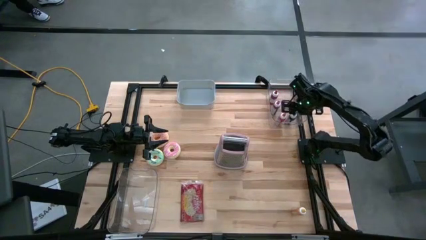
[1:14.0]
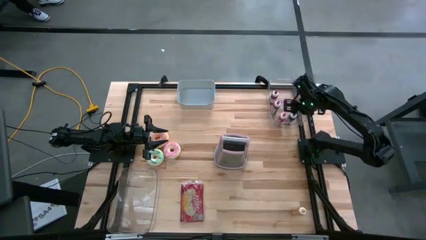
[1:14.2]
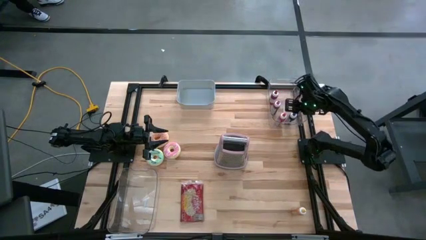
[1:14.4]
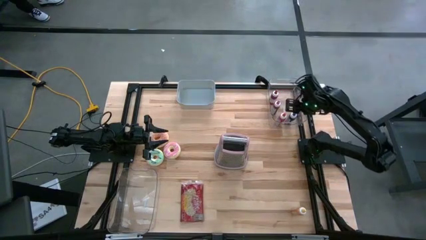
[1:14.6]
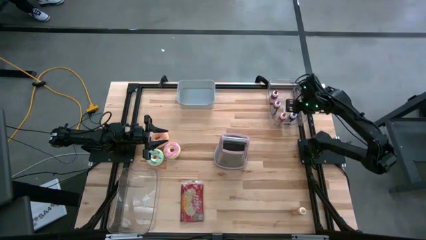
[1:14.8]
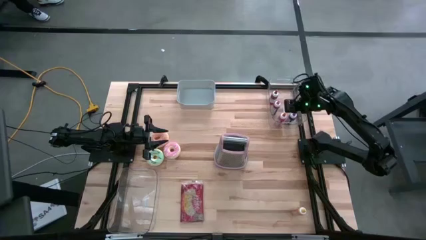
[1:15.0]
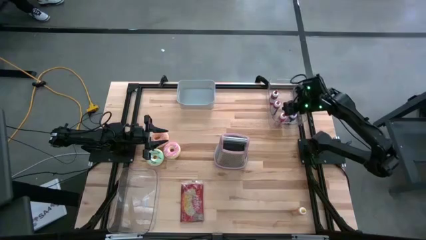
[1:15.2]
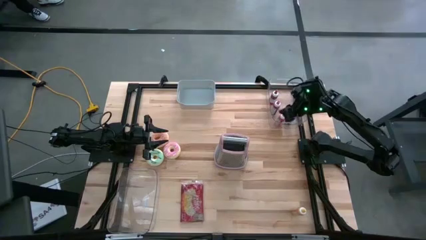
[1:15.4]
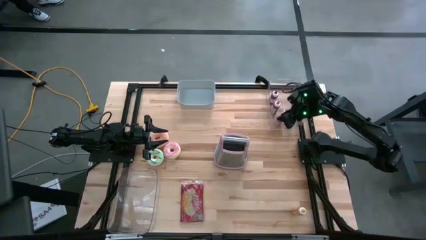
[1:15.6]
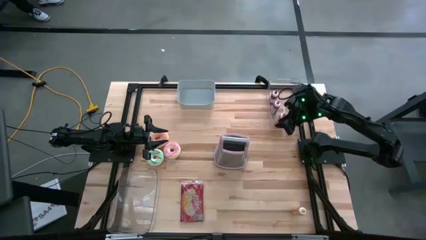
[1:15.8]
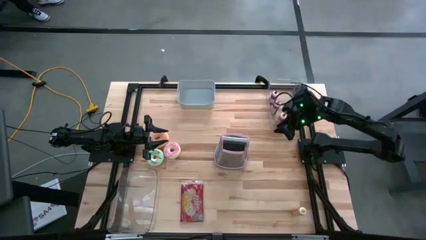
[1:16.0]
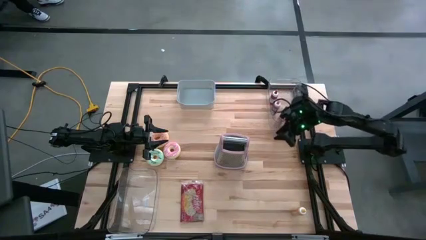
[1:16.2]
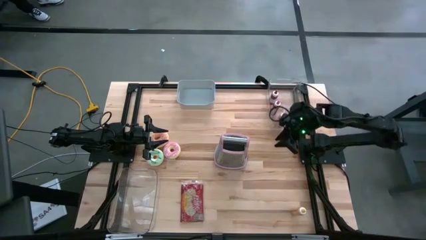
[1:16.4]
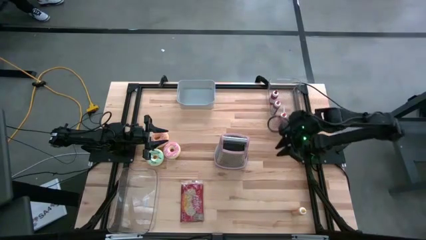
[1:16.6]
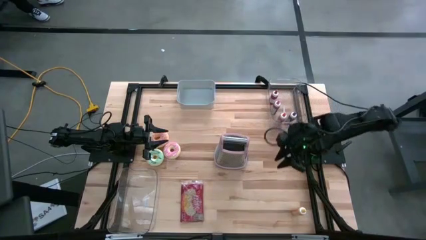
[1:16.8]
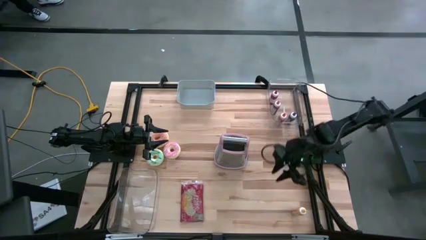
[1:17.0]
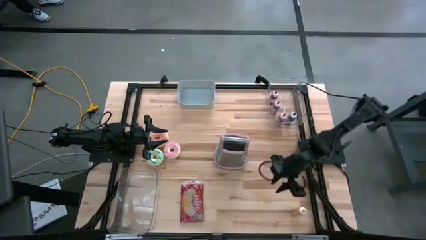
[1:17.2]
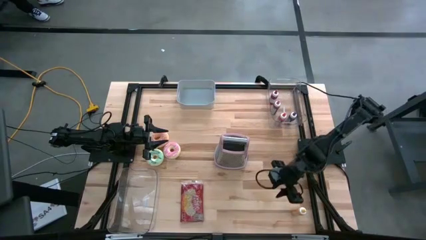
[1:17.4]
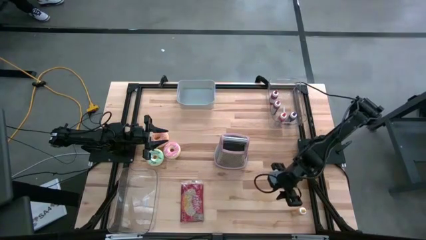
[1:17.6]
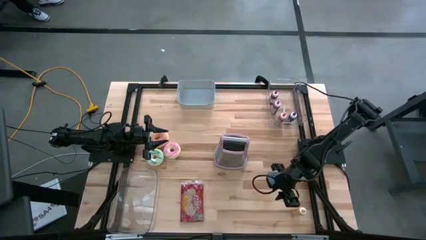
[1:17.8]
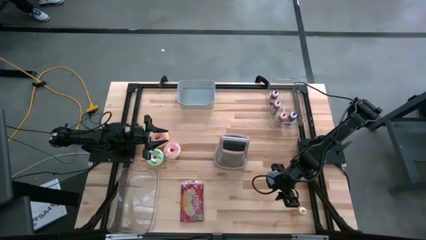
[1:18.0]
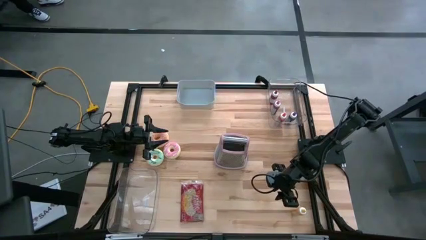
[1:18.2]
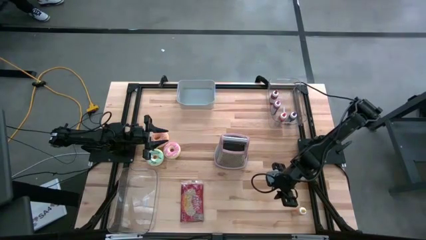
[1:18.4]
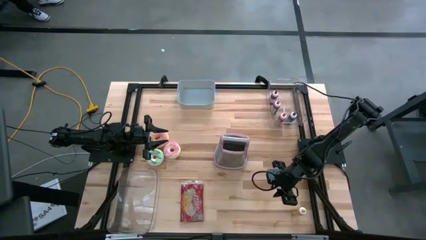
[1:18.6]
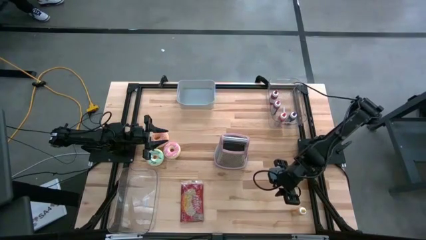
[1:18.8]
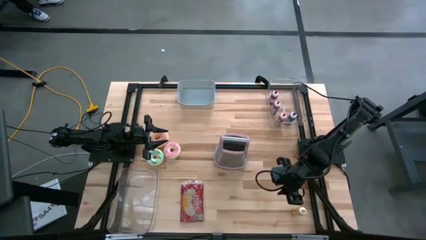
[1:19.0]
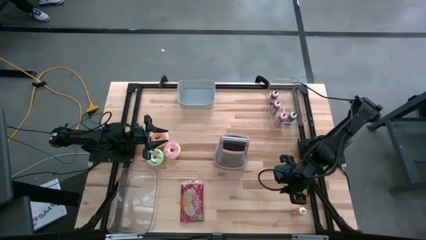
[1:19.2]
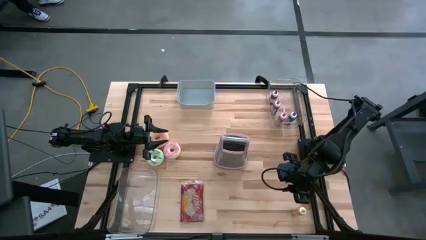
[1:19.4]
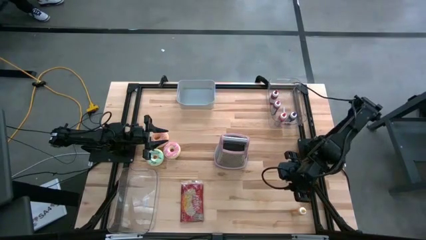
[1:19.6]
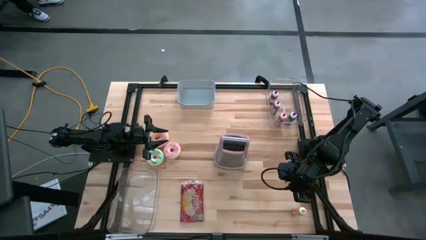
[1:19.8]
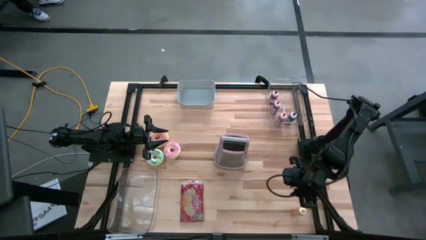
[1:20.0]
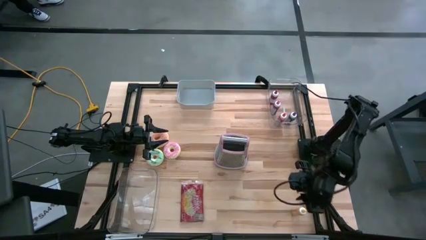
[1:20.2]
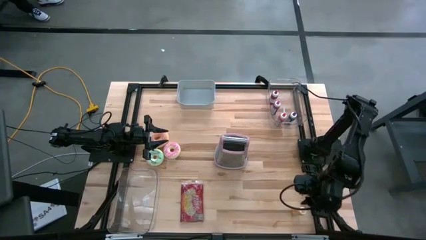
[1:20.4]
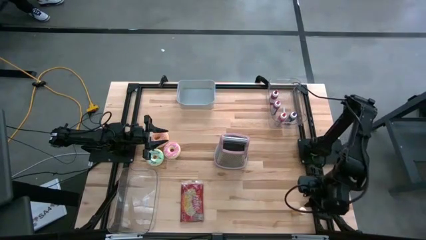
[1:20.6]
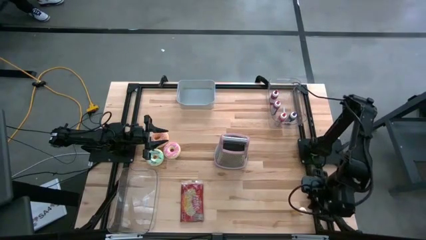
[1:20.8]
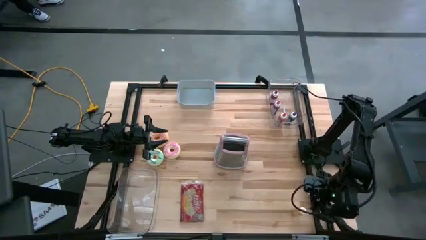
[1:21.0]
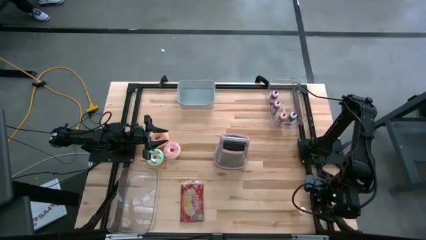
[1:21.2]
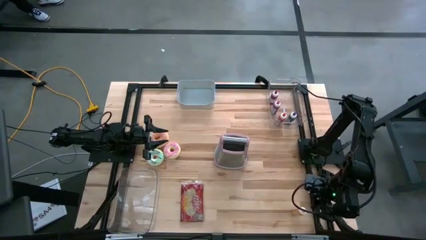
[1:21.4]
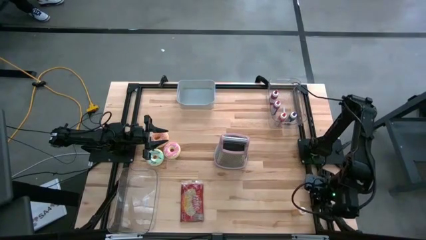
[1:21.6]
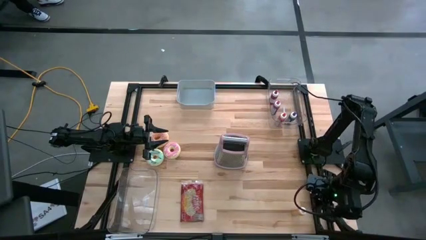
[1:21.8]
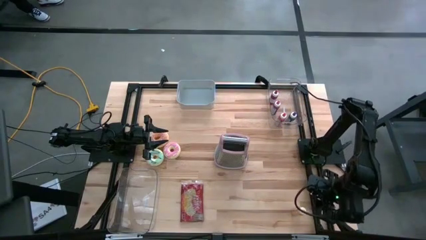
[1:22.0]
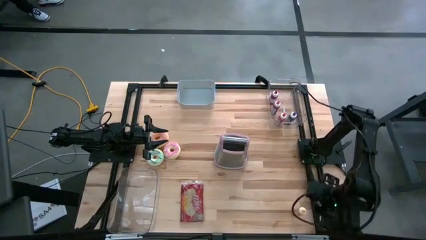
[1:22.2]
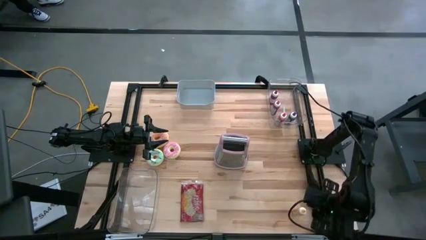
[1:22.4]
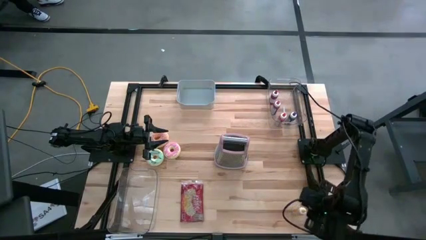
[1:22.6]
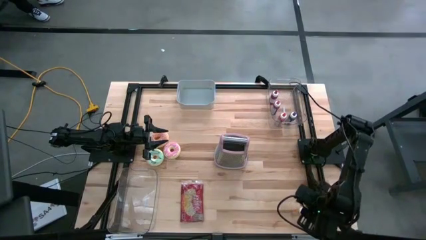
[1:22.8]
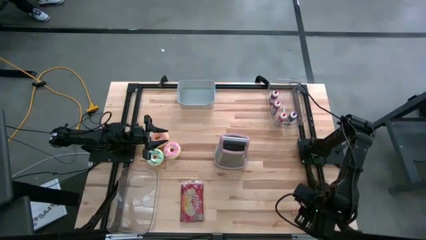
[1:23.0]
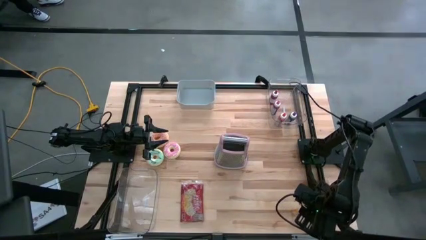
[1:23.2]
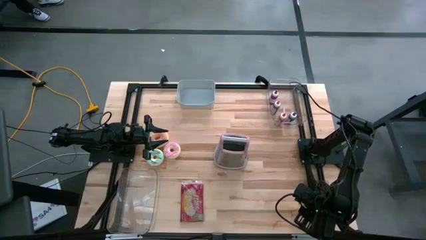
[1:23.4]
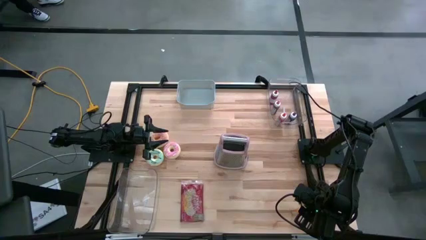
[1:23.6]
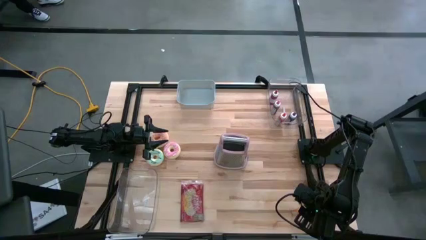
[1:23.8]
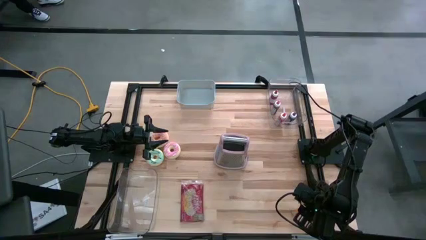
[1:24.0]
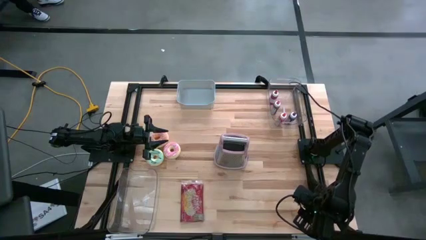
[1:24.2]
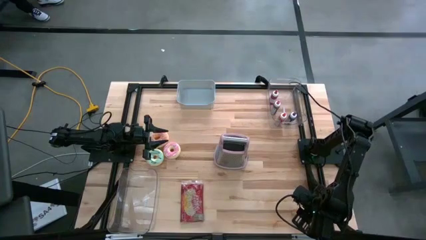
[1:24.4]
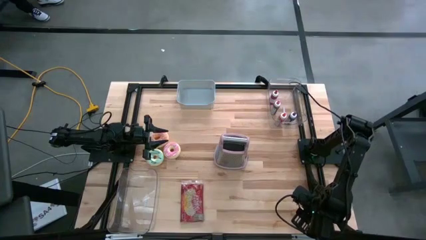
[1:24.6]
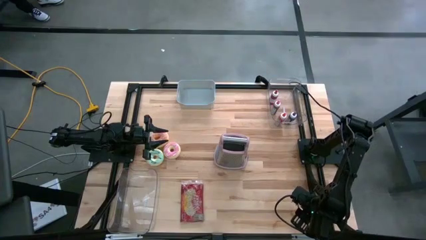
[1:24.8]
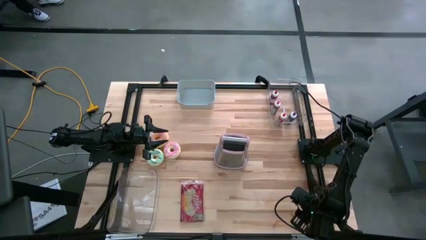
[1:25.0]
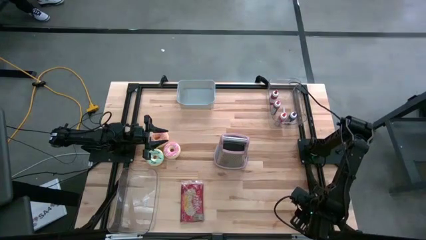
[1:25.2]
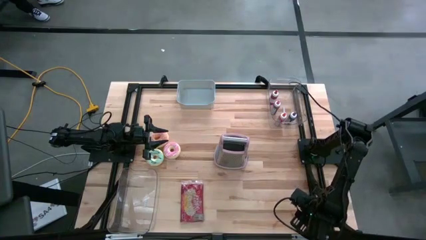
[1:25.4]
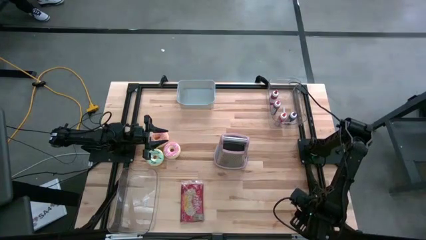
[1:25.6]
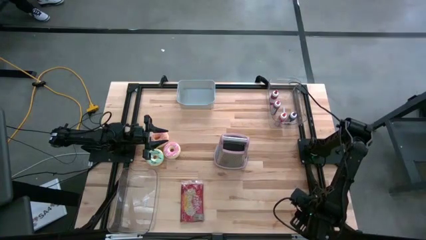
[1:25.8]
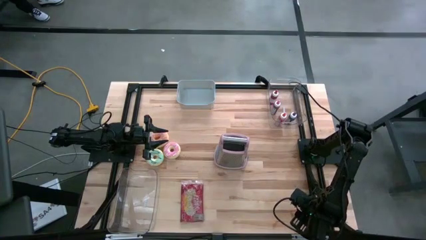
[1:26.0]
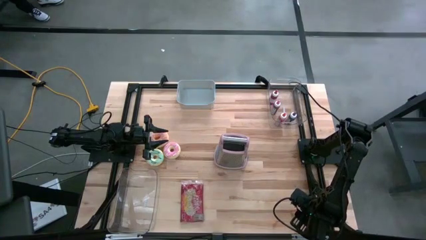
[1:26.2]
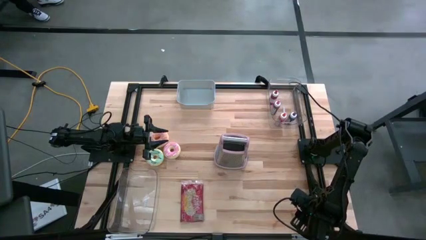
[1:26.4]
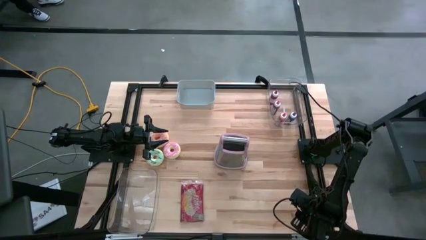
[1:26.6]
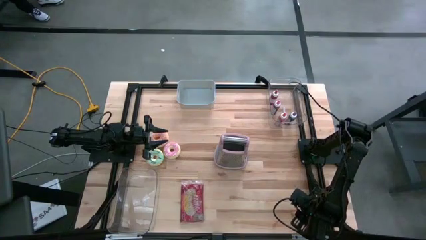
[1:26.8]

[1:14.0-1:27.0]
Put the yellow food coloring into the right transparent bin
